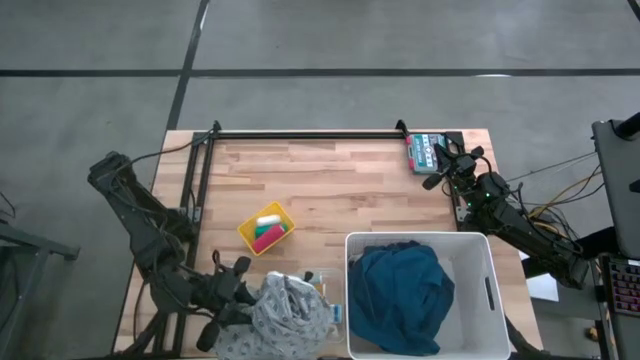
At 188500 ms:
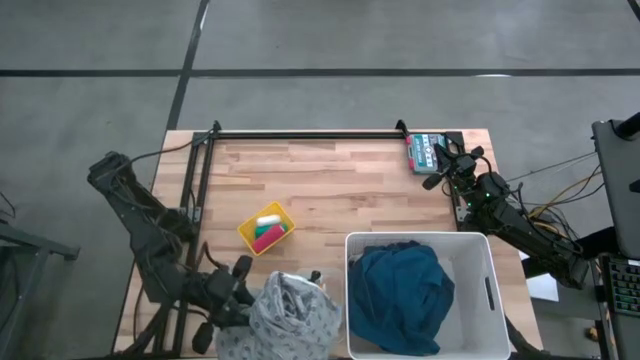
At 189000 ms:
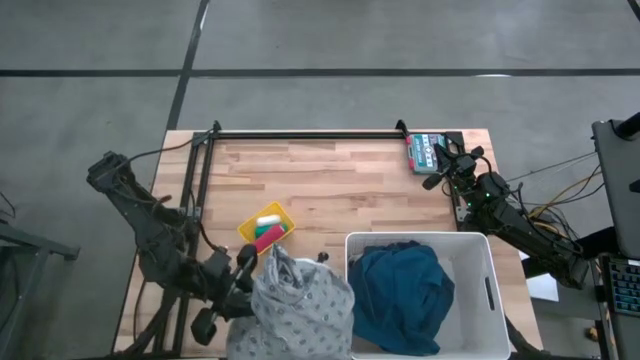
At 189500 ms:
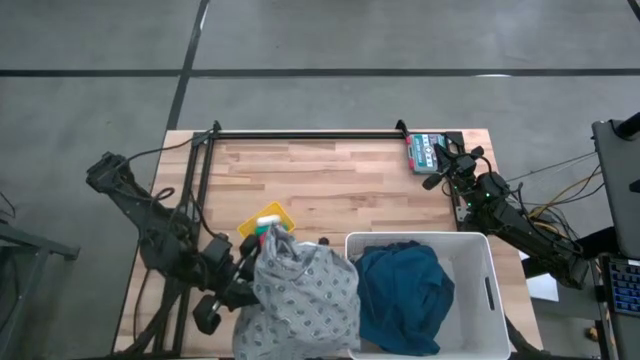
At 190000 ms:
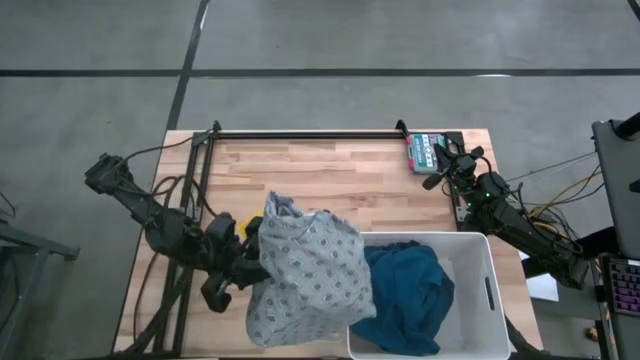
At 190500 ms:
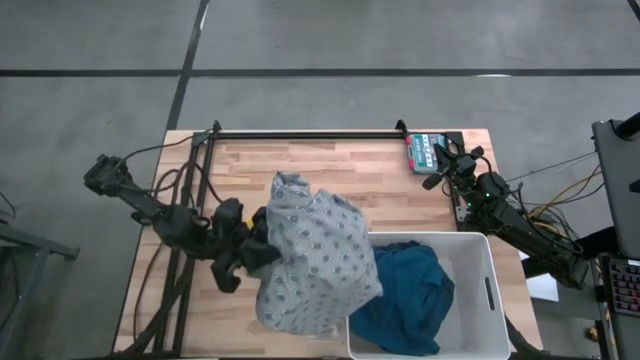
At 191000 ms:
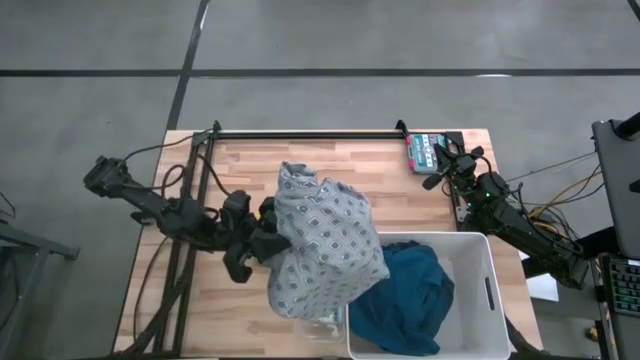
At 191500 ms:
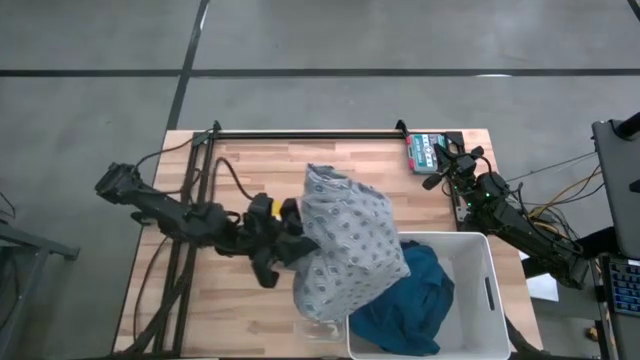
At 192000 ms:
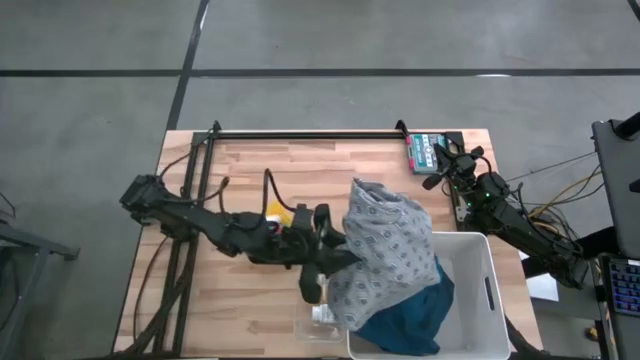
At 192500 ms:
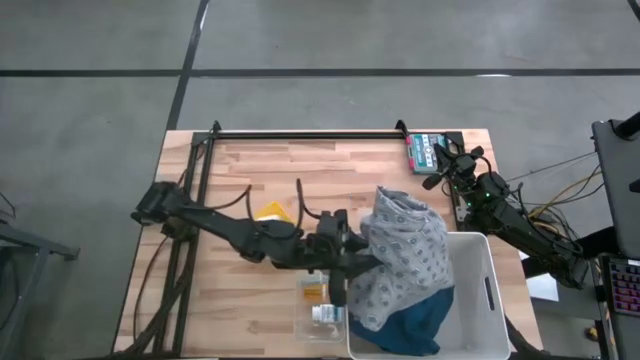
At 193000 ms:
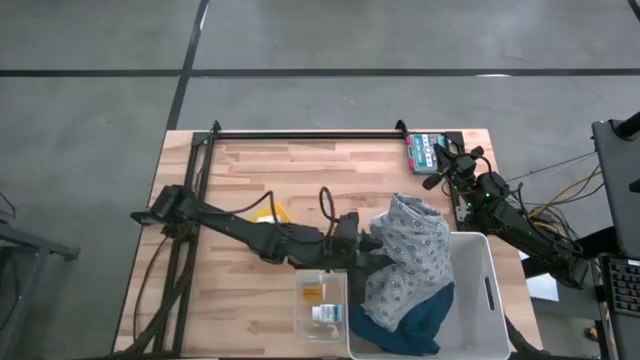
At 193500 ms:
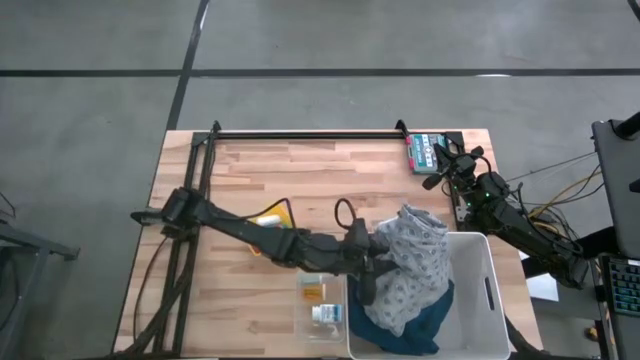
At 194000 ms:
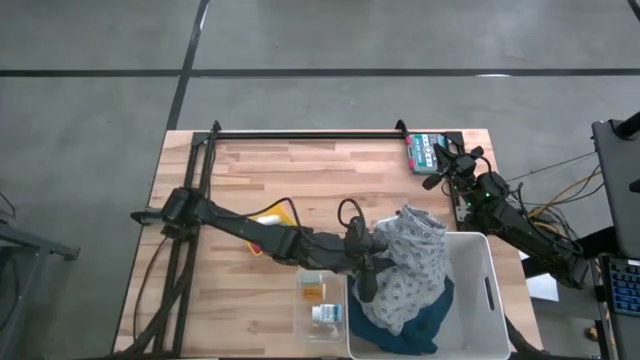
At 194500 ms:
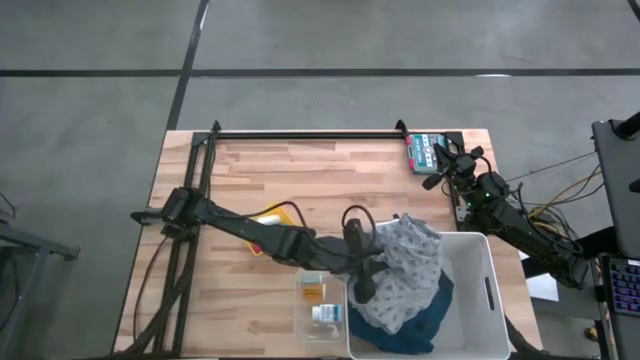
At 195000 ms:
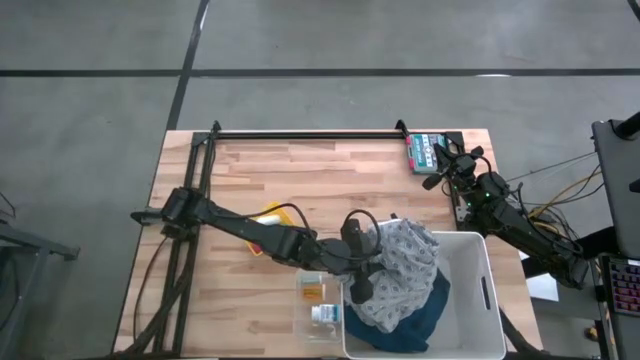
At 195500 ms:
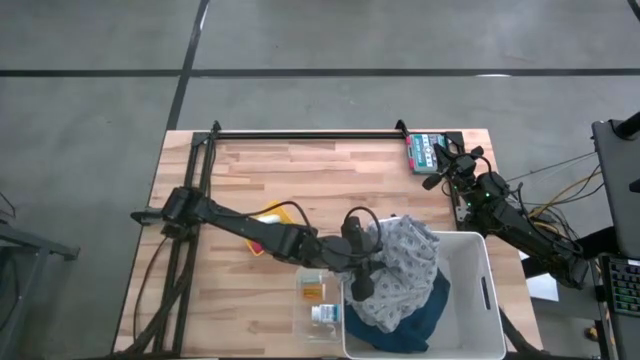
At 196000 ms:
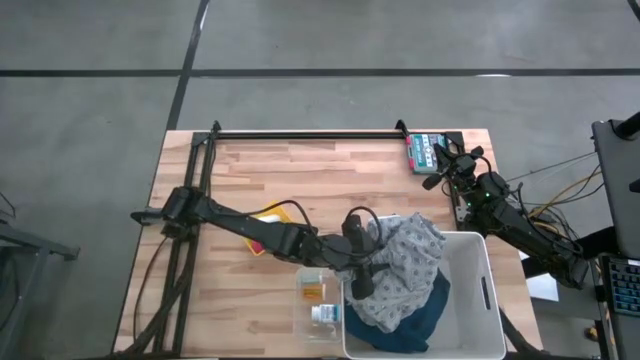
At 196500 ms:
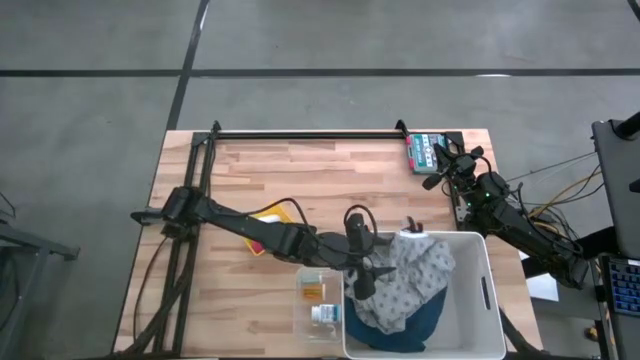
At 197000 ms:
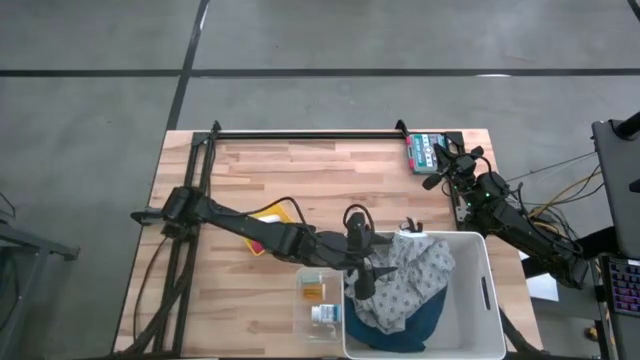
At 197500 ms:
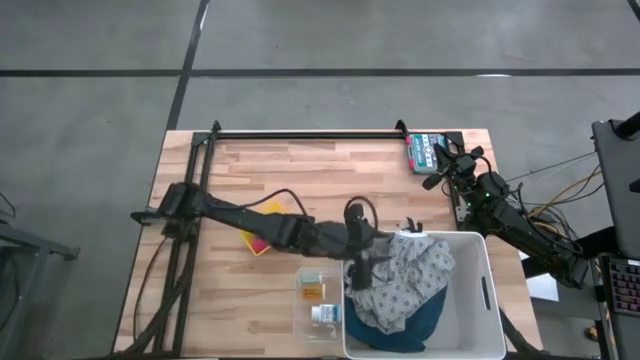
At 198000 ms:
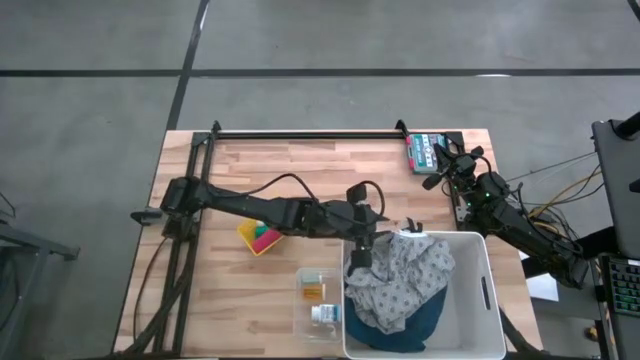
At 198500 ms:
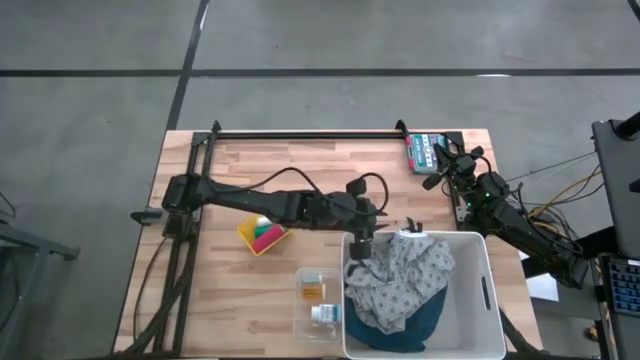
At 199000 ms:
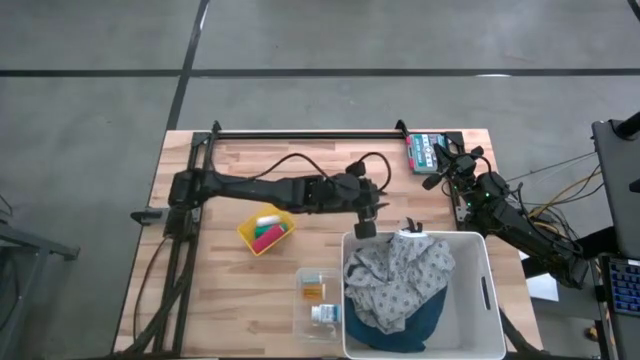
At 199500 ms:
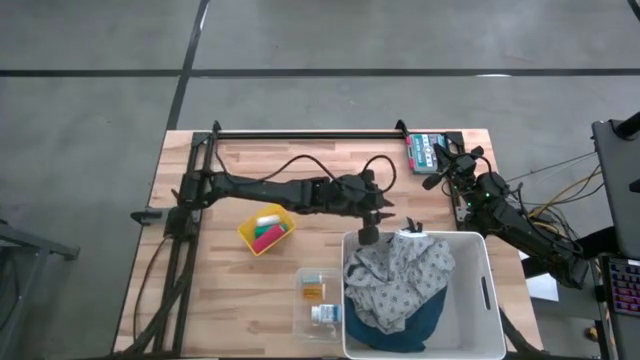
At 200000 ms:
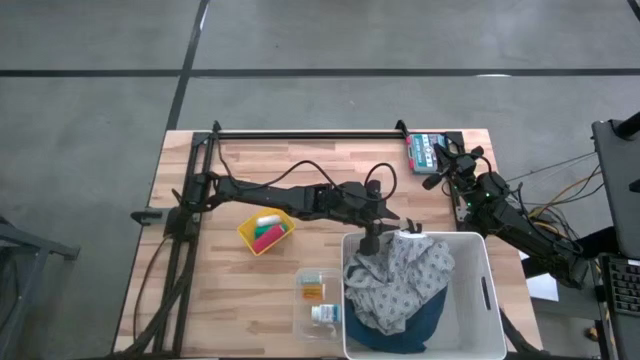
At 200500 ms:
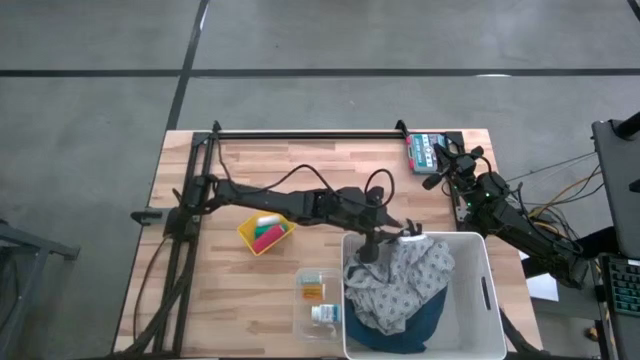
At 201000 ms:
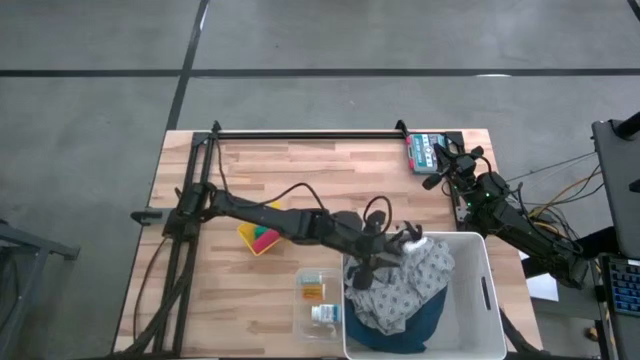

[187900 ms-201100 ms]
Task: Pick & Place Medicine items
Put the light blue patient gown into the white laundry bin

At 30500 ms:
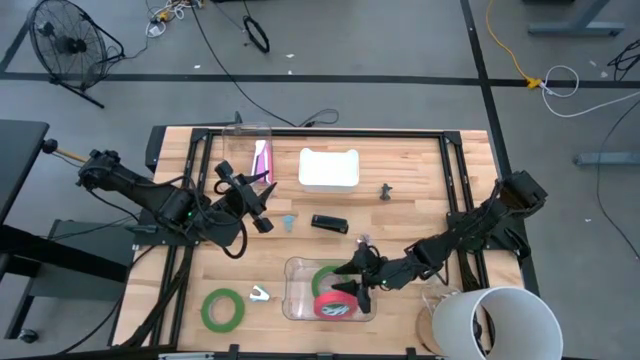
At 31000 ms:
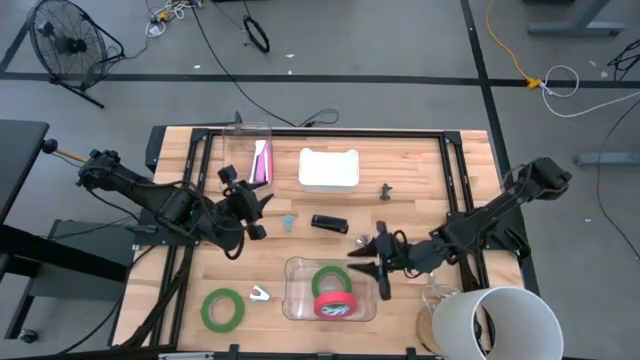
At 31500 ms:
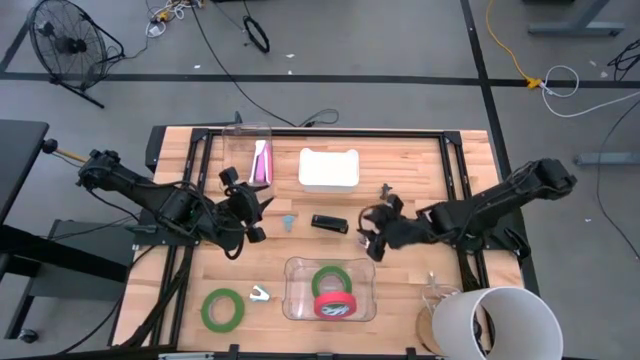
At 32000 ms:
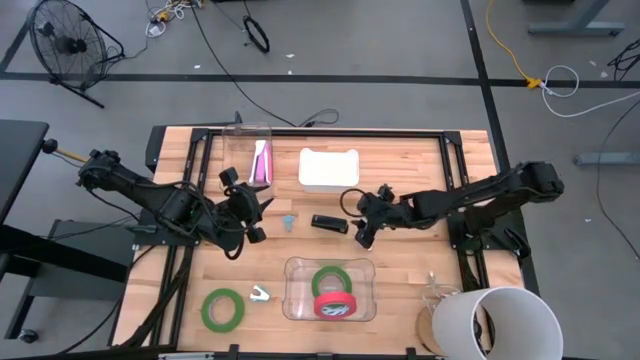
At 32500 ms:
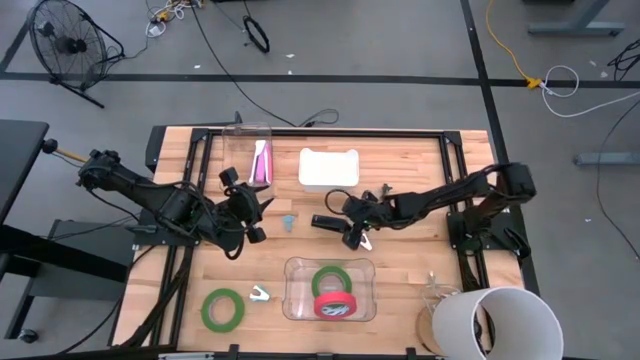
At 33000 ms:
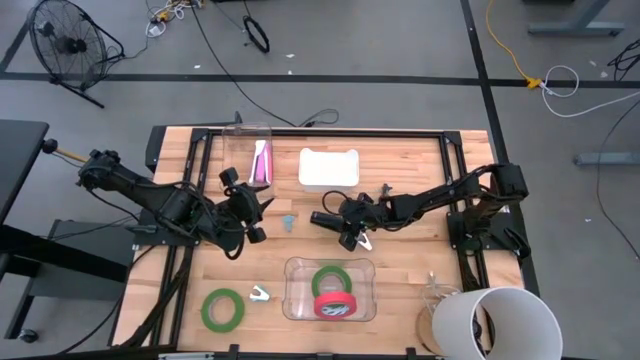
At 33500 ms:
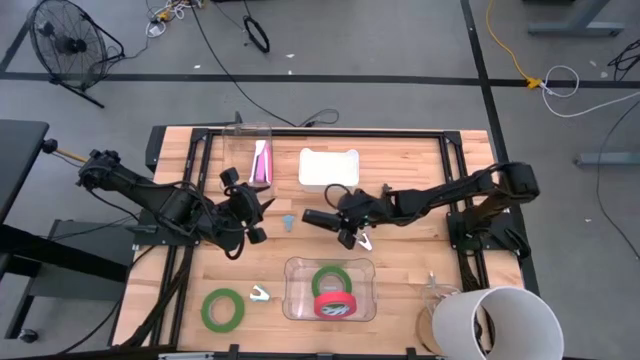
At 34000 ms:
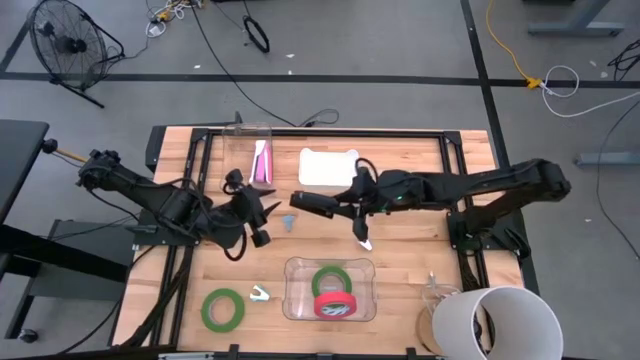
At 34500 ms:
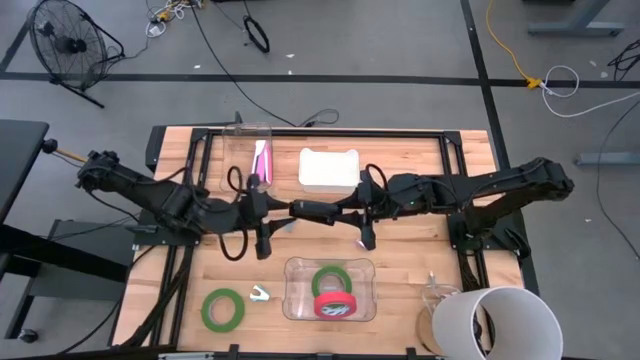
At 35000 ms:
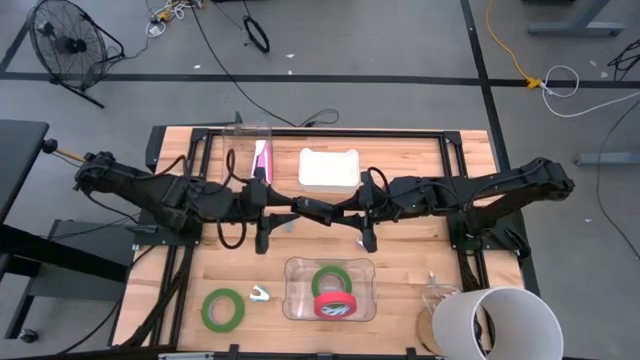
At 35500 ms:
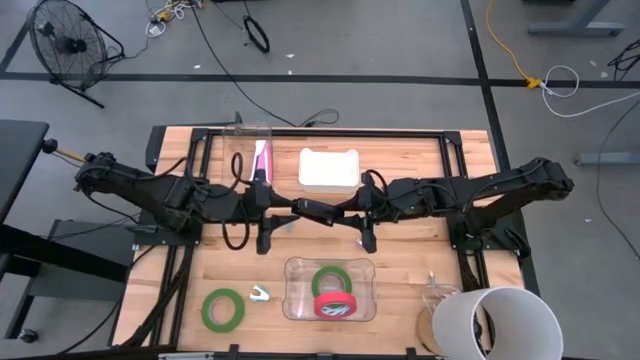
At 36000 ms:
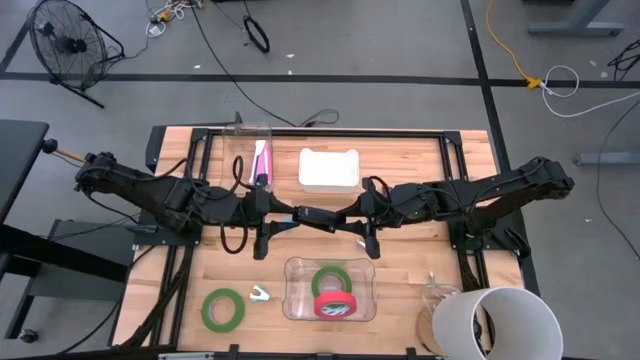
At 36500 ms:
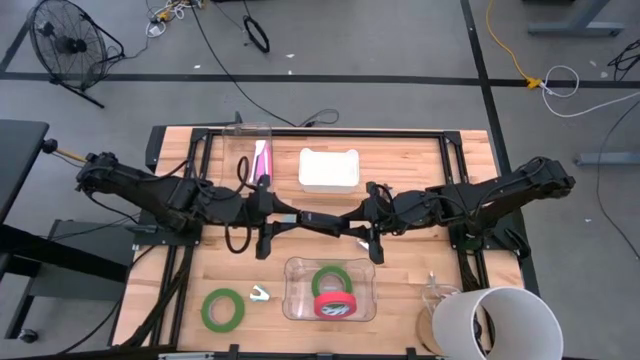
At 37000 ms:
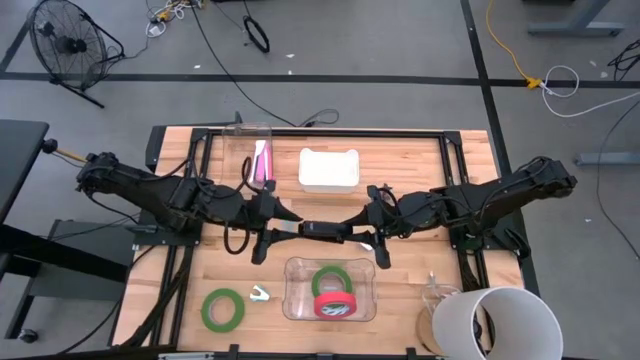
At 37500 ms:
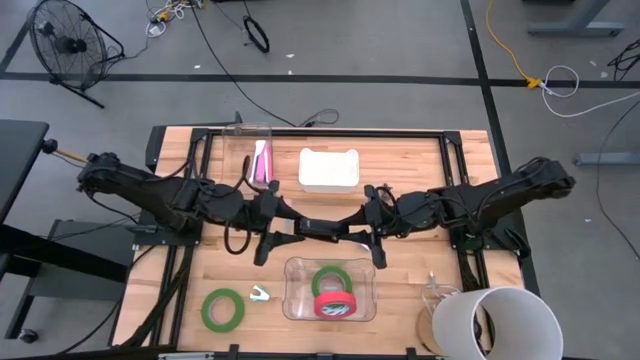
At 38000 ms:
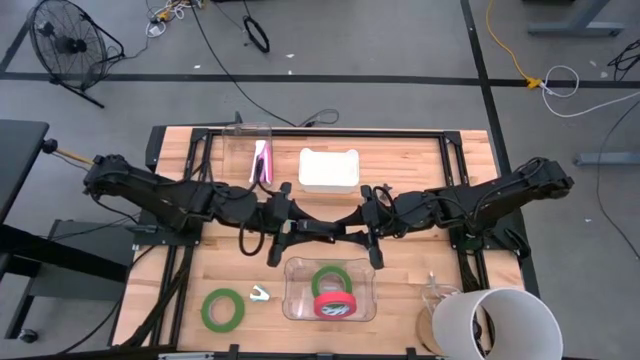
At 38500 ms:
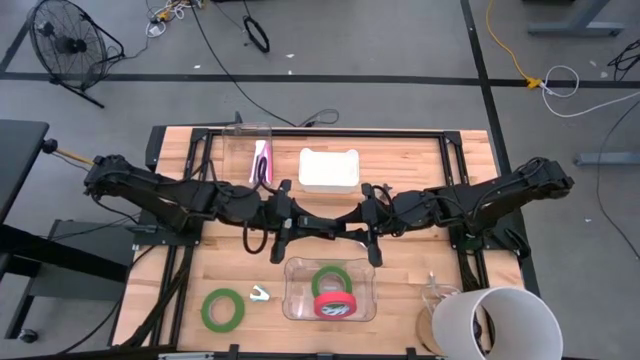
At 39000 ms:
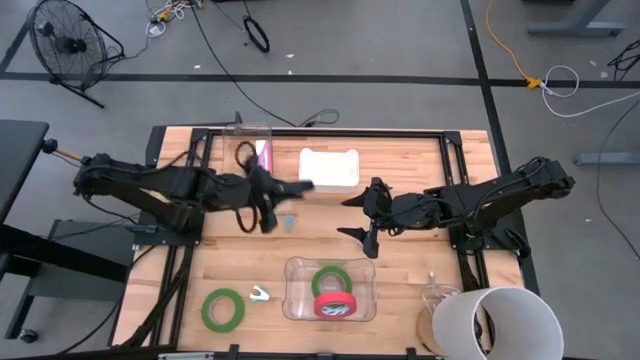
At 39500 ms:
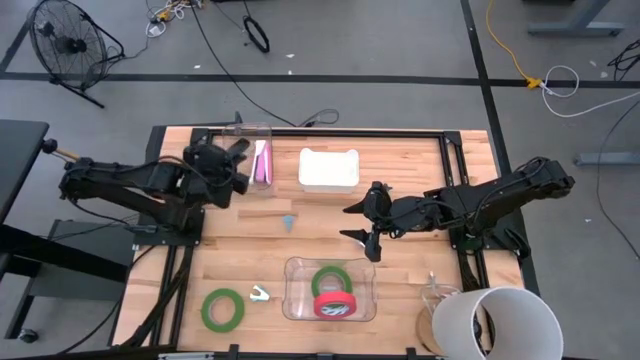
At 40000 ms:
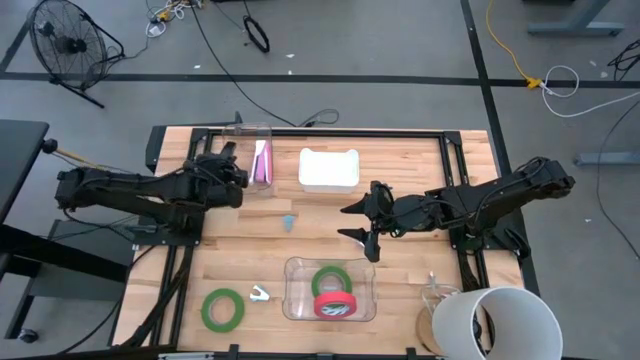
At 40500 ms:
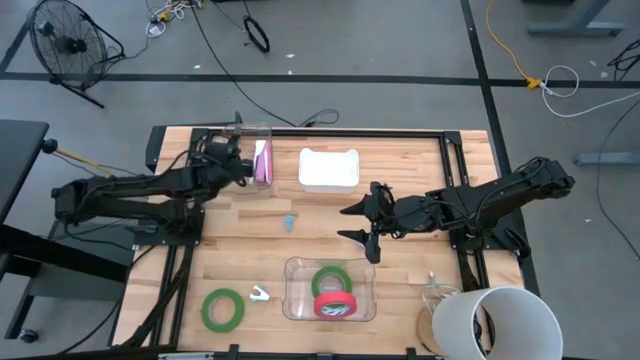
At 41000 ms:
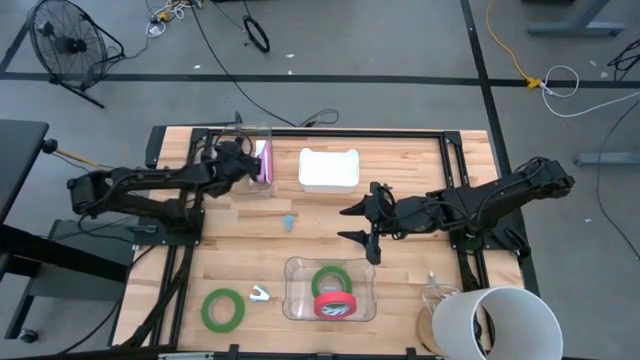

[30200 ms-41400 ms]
Task: Pick and place Stapler, Stapler remover, tape
Put the black stapler into the top transparent bin
